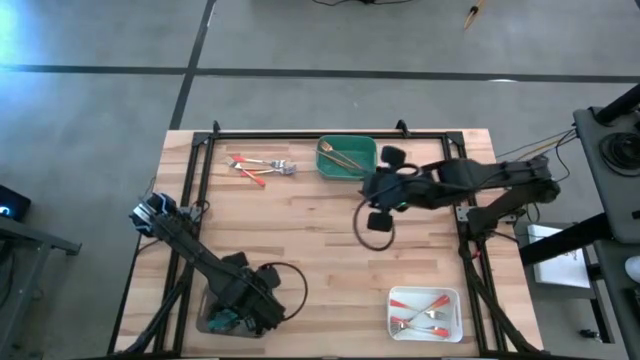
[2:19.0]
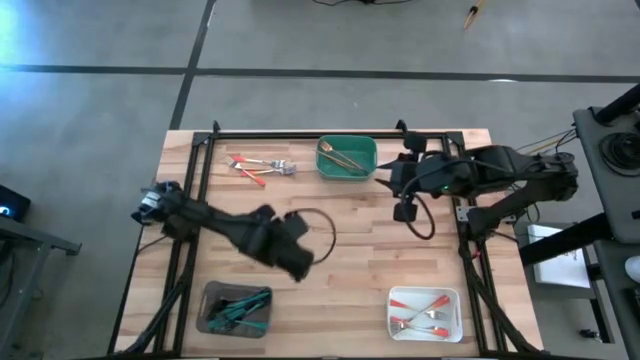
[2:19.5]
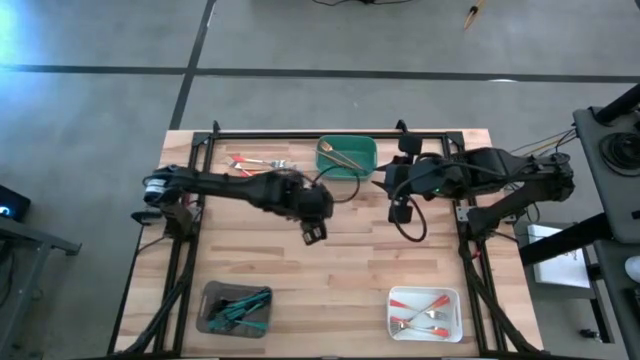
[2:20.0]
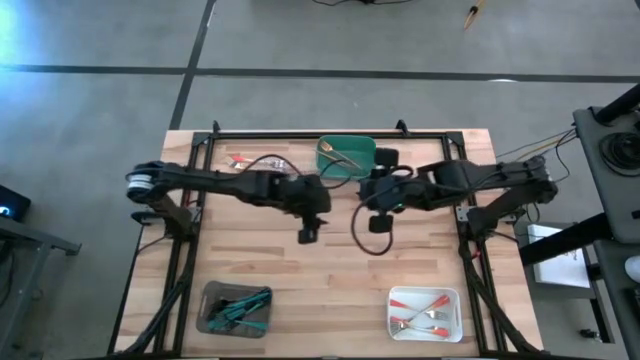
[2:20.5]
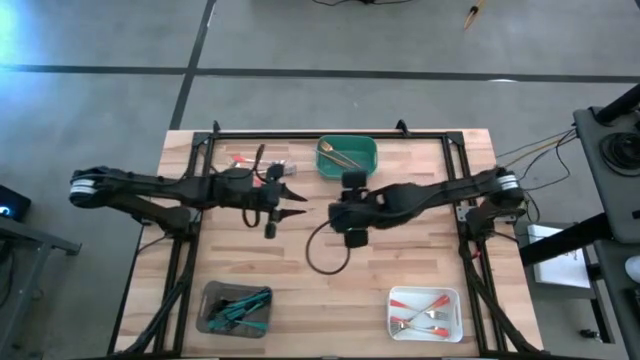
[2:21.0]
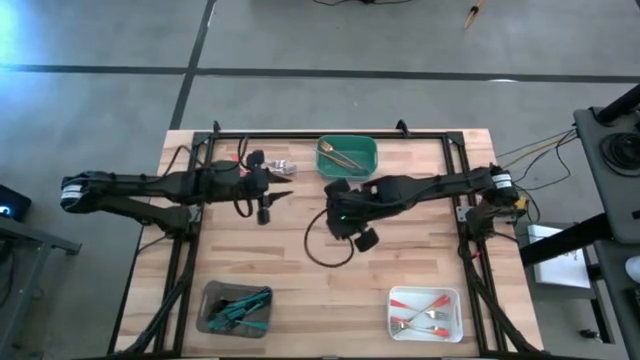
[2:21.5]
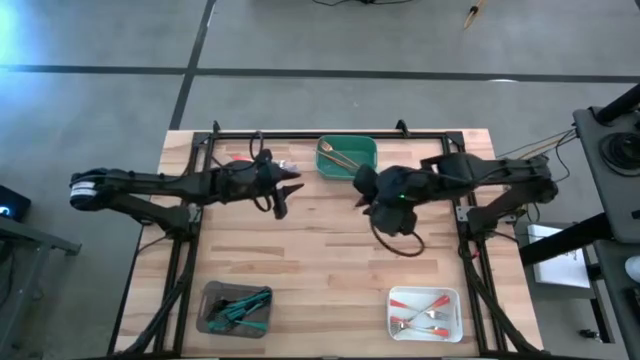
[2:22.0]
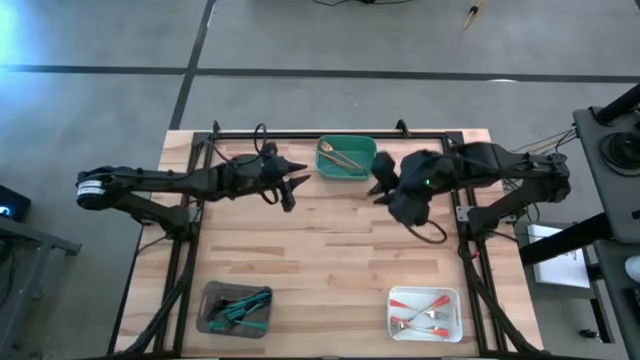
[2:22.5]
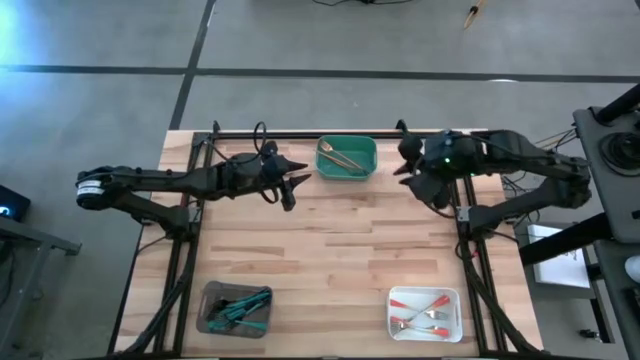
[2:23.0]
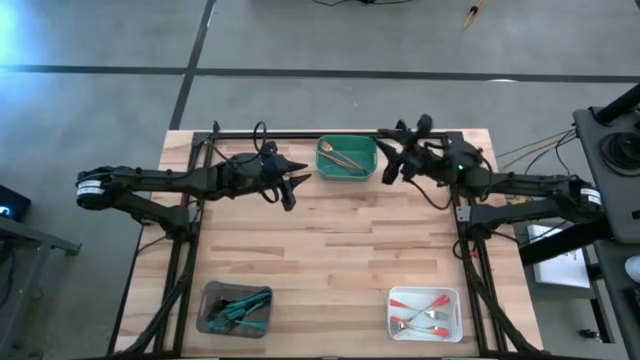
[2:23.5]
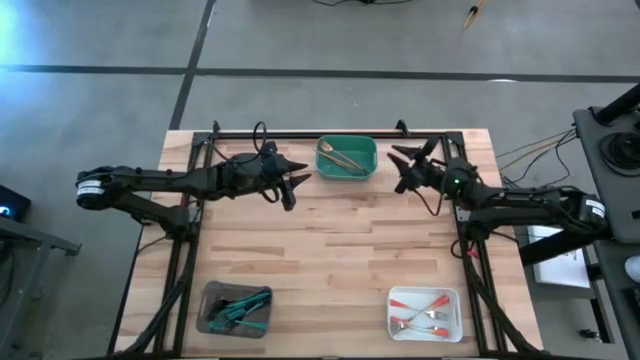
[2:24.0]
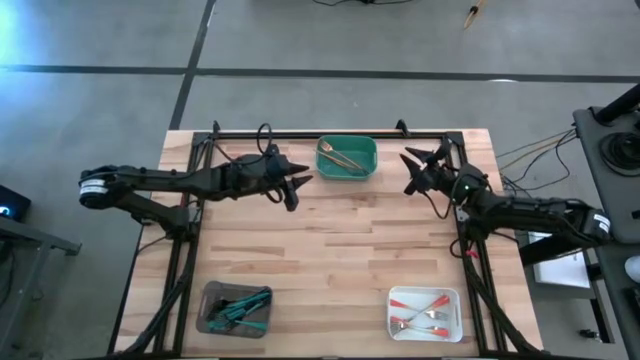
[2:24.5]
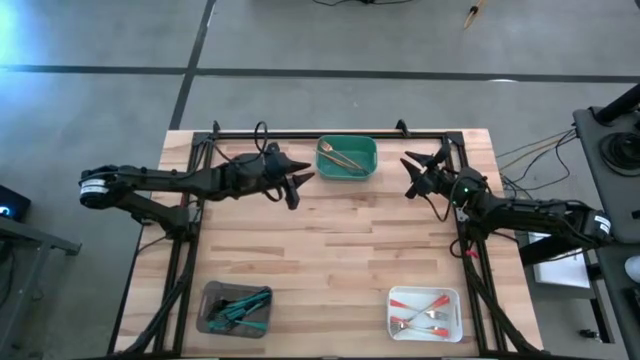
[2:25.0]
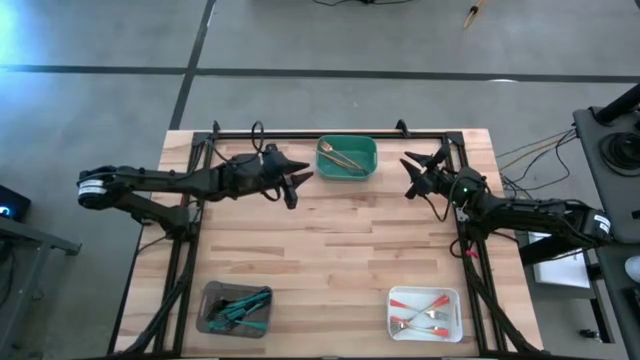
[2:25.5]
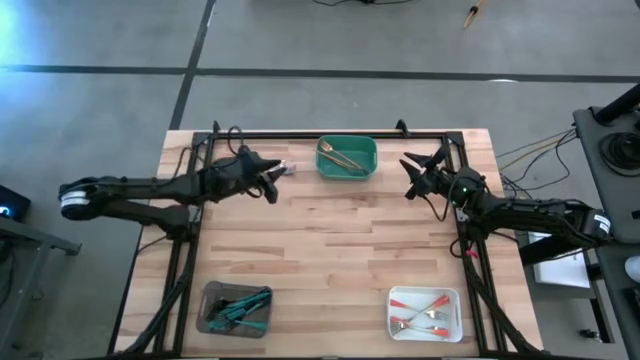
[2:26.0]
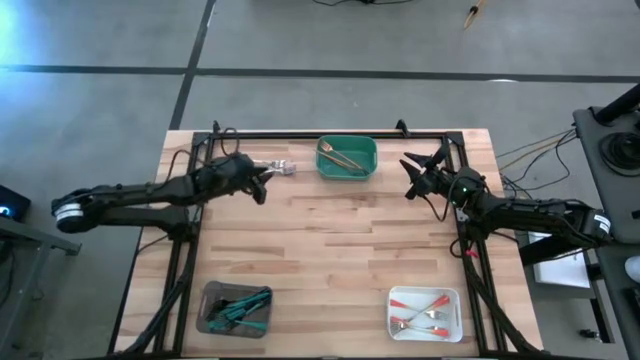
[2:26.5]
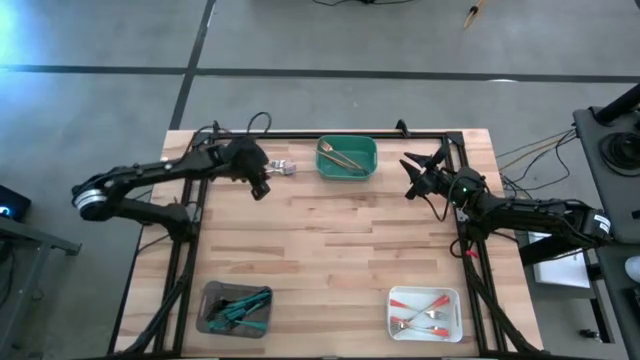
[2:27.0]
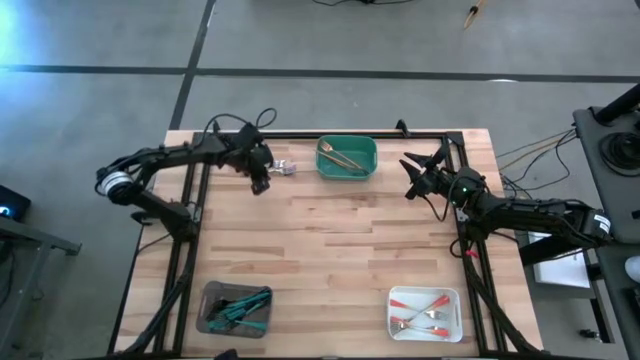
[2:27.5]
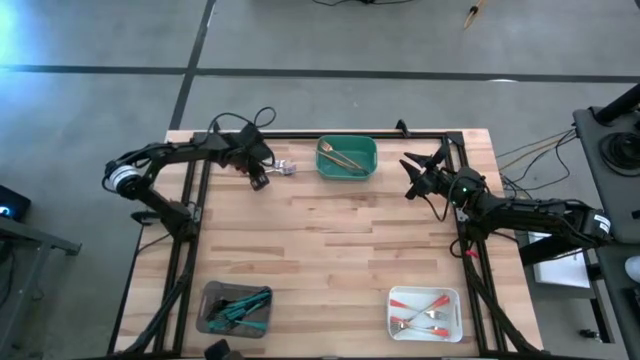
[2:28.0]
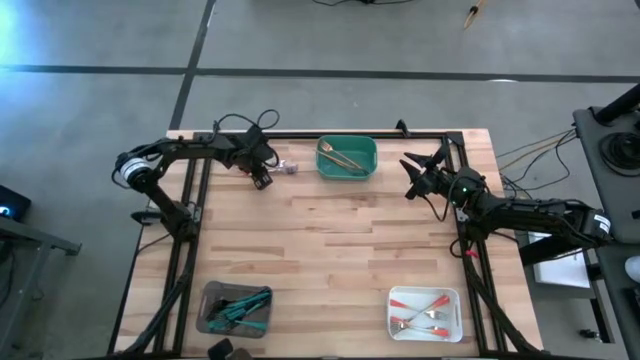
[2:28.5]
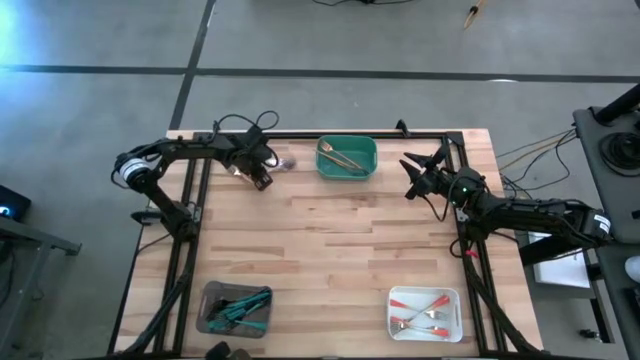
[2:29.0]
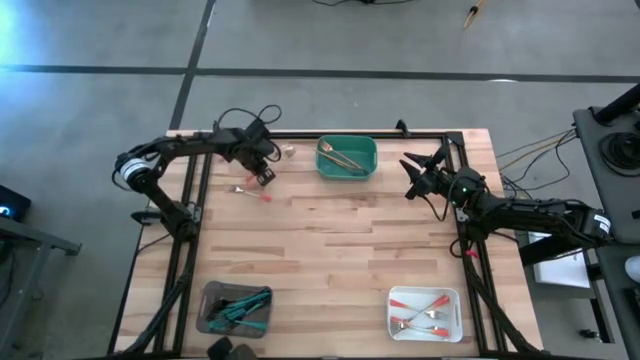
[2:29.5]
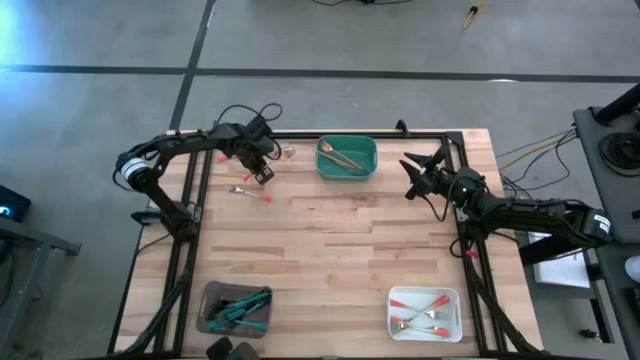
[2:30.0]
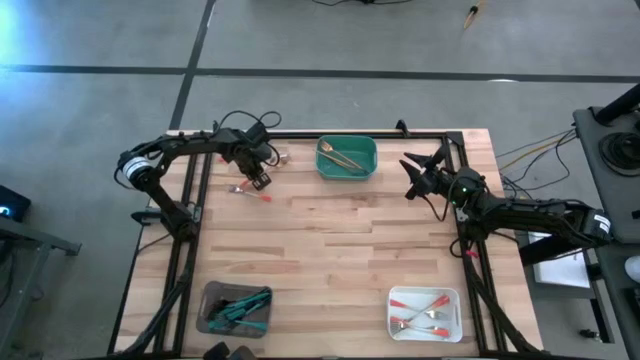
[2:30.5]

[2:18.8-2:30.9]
Task: Sort silverware by color (type)
Put the orange fork into the white bin

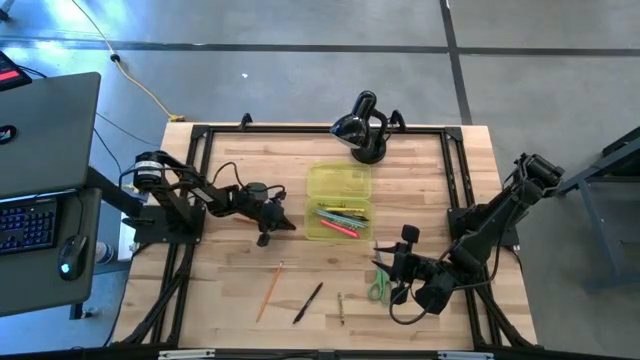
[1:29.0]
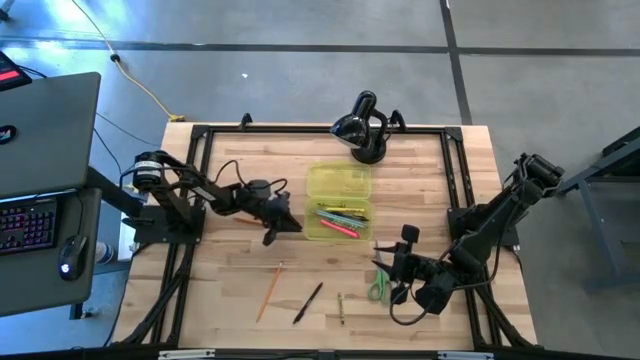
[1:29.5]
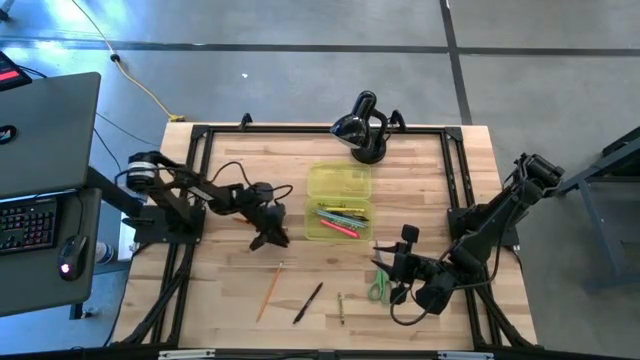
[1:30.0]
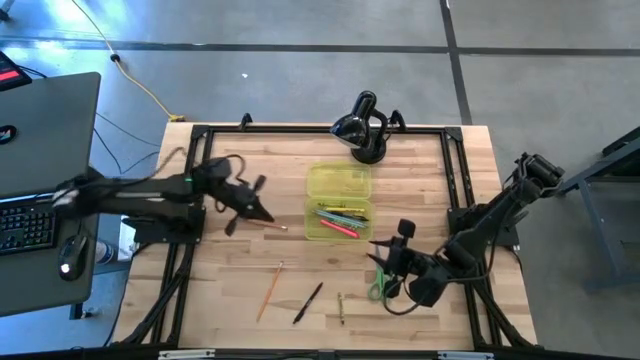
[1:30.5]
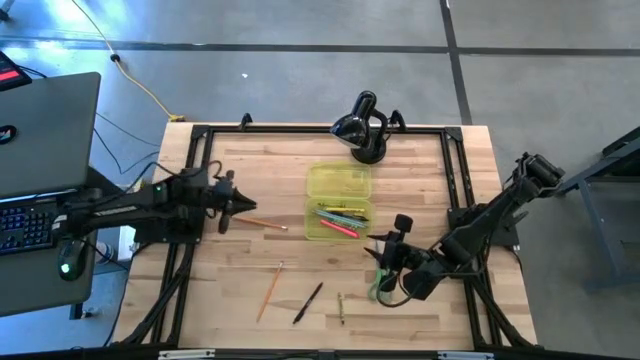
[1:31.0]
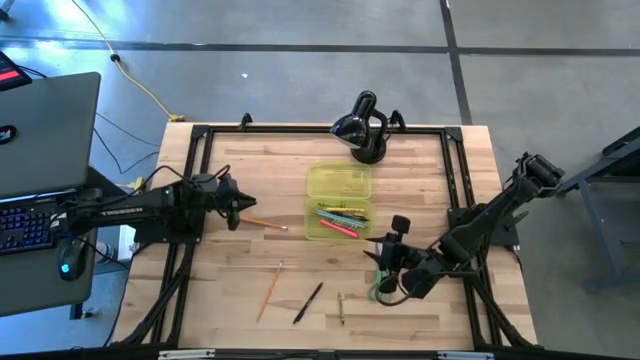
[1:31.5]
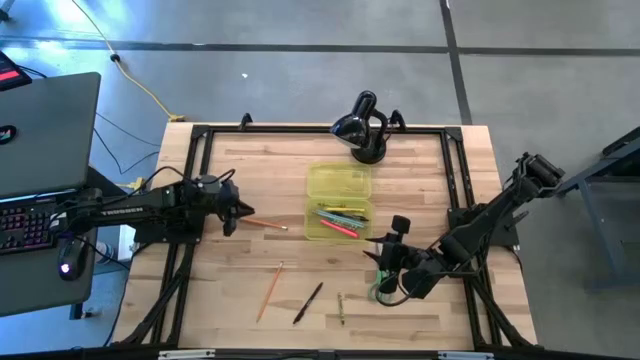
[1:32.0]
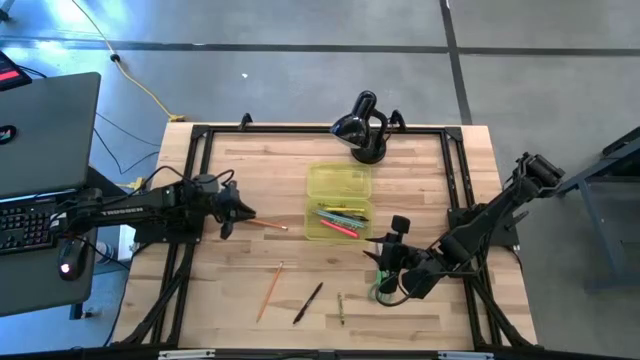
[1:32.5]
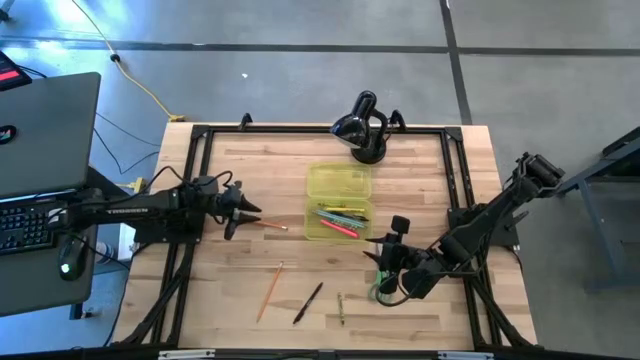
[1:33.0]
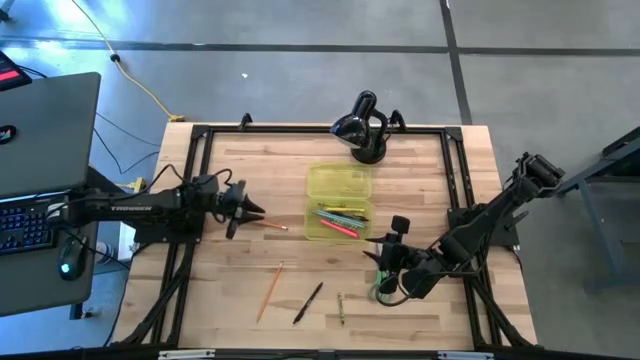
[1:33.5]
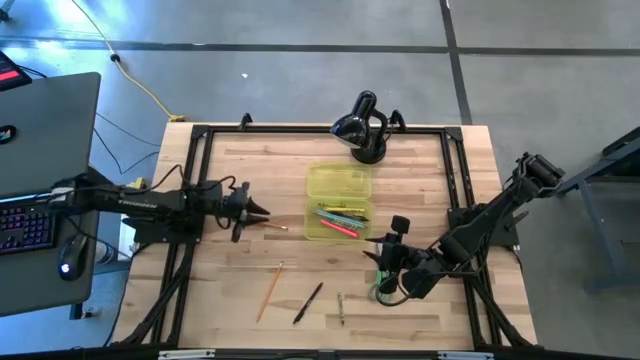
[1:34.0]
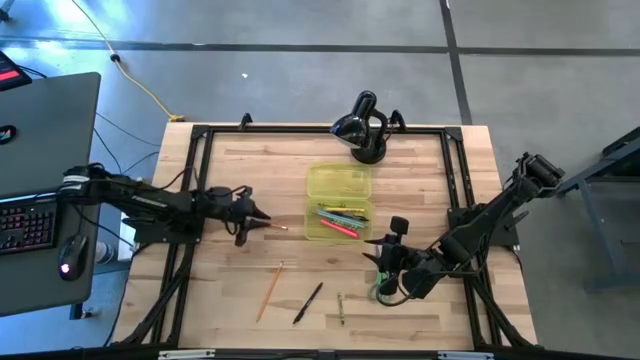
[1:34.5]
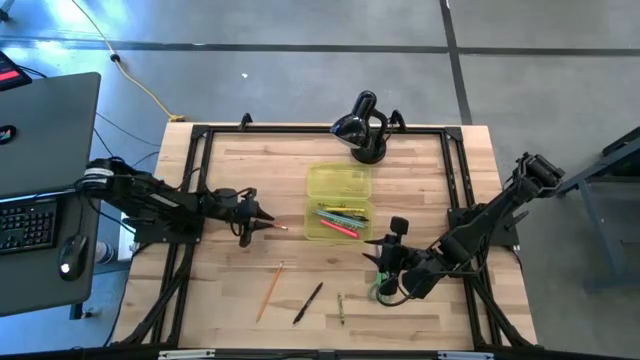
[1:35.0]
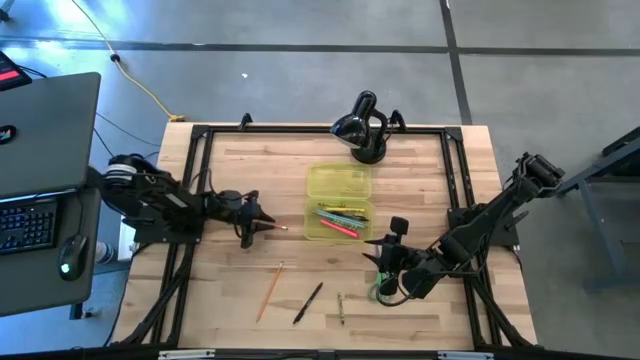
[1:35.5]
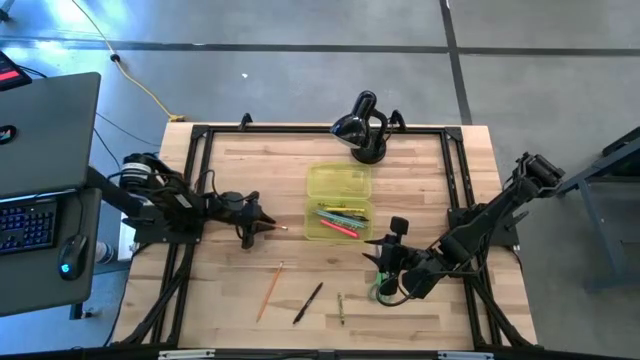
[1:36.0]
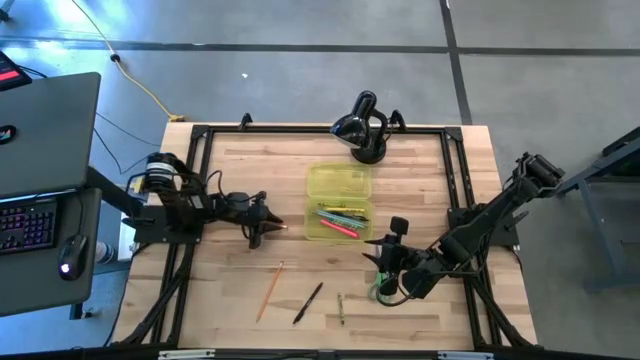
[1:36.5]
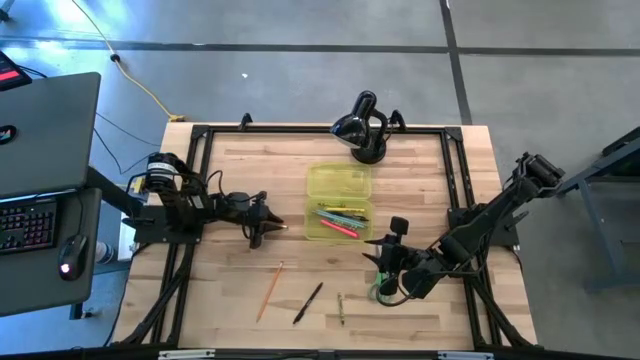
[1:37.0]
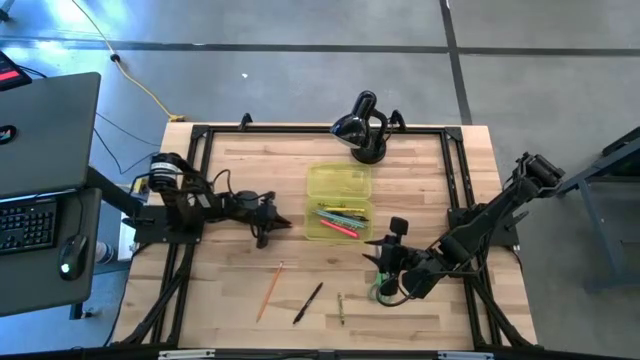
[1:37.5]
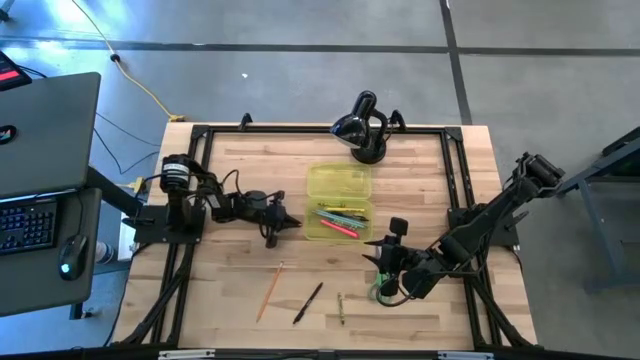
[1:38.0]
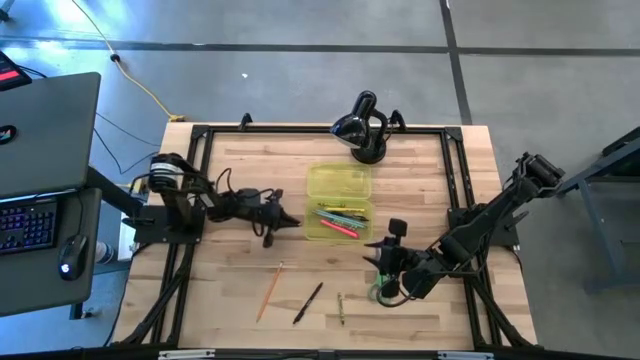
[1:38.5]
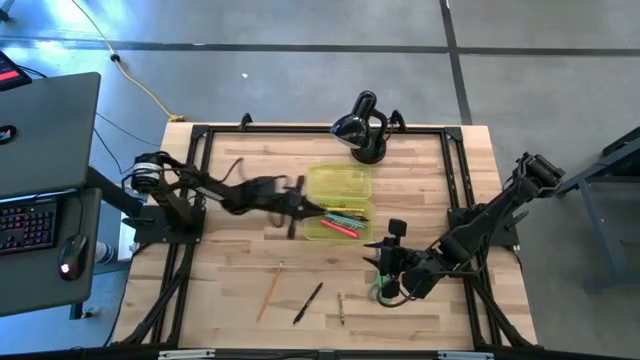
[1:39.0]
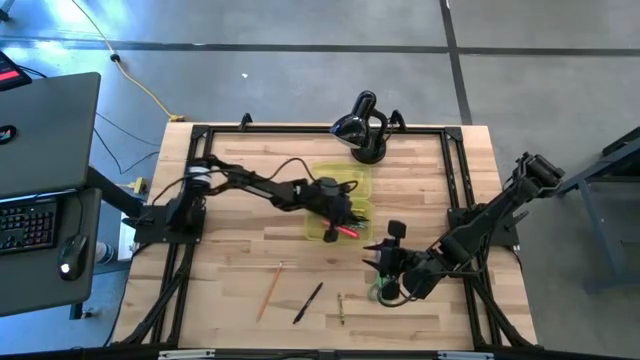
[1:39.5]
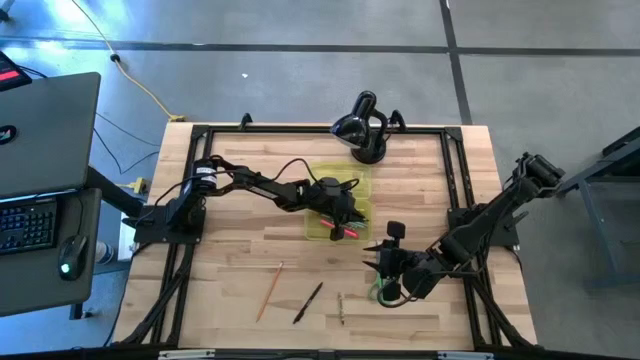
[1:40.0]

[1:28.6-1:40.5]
Task: Pick & place school supplies into a supply box
Put the orange pencil in to the yellow school supply box
